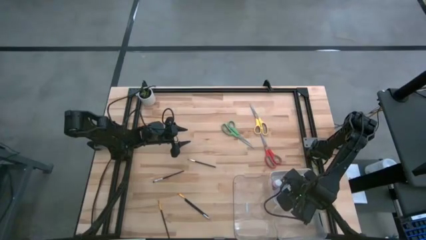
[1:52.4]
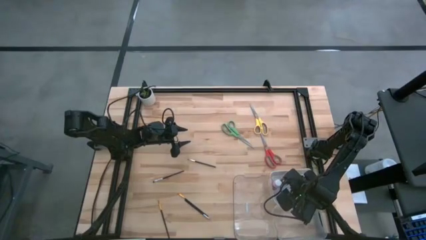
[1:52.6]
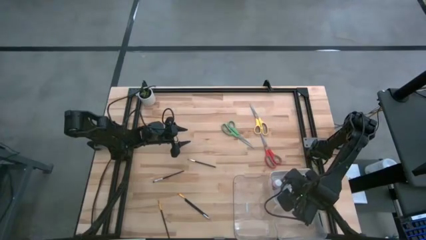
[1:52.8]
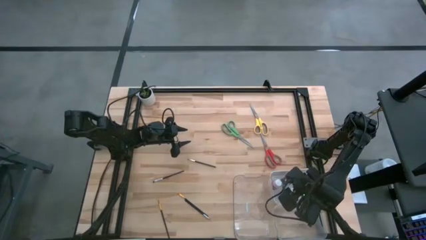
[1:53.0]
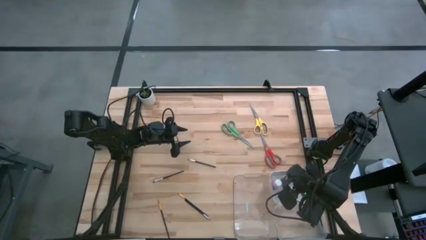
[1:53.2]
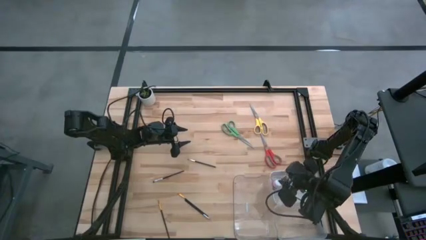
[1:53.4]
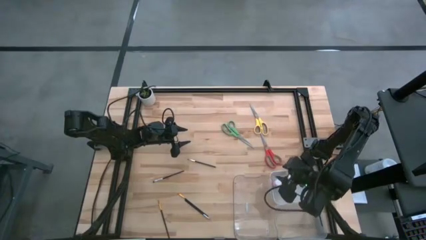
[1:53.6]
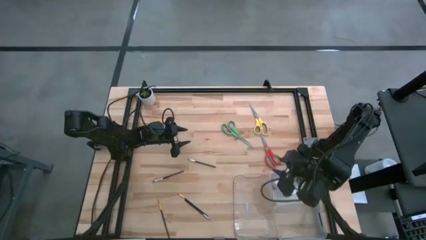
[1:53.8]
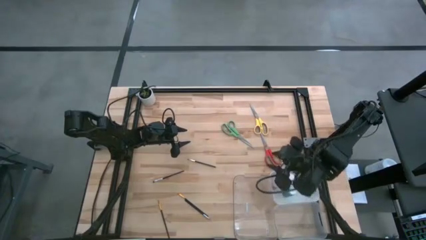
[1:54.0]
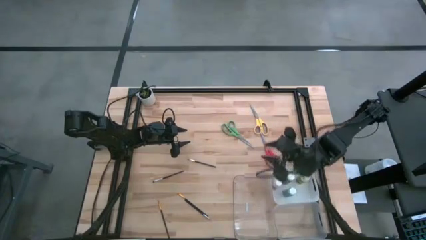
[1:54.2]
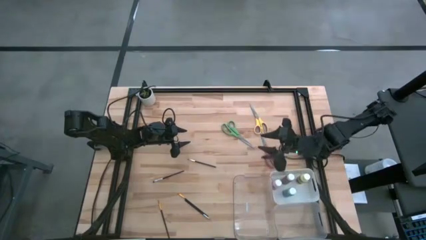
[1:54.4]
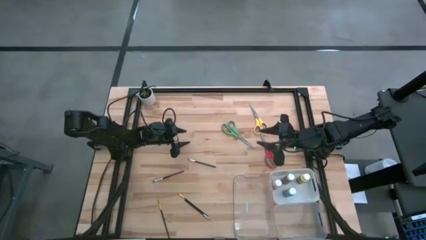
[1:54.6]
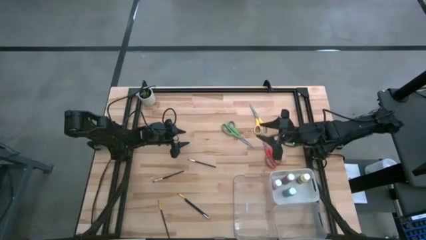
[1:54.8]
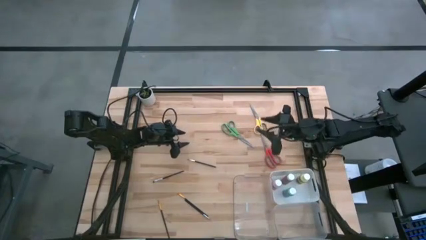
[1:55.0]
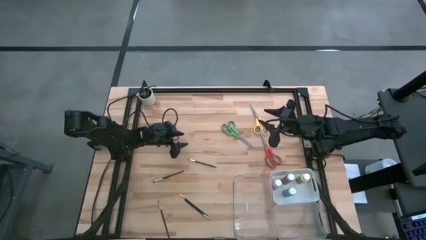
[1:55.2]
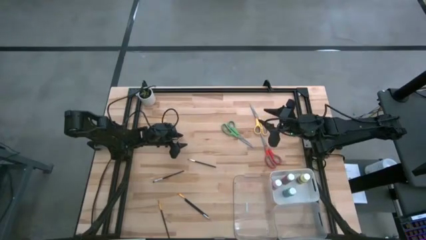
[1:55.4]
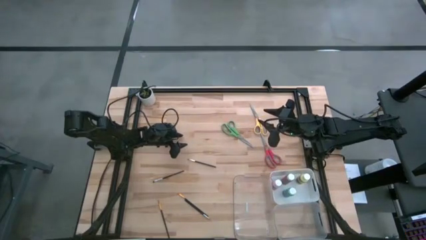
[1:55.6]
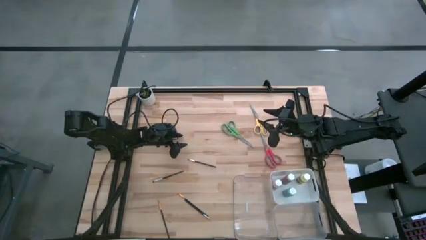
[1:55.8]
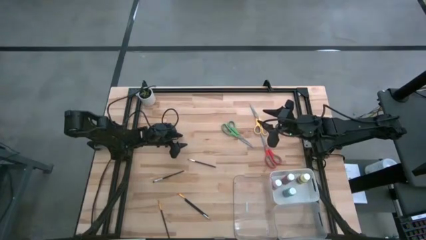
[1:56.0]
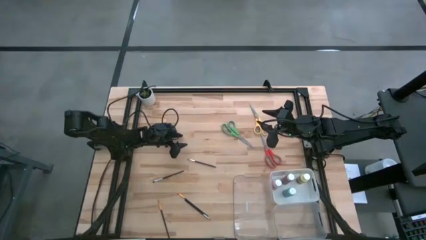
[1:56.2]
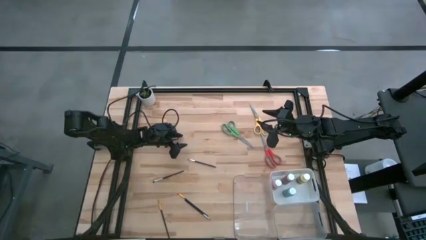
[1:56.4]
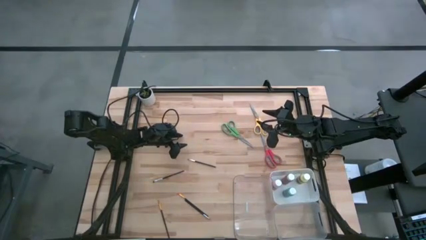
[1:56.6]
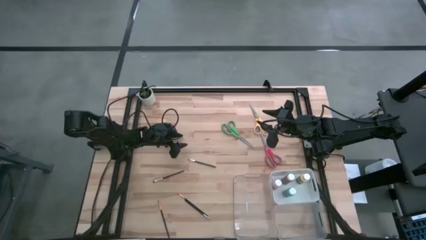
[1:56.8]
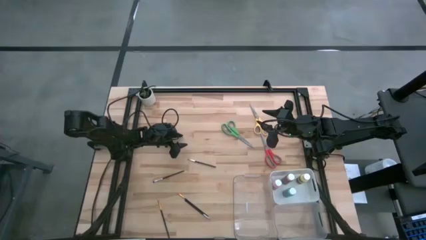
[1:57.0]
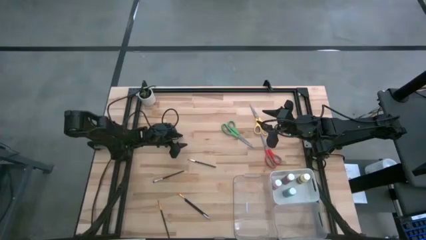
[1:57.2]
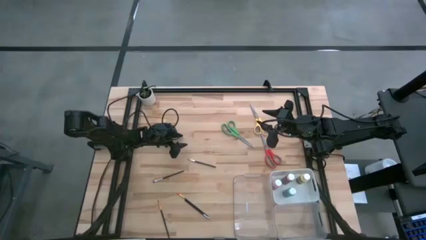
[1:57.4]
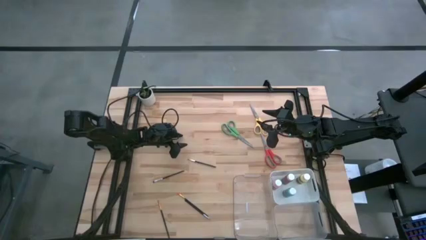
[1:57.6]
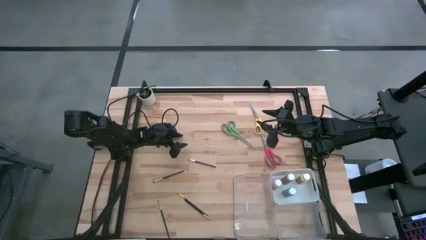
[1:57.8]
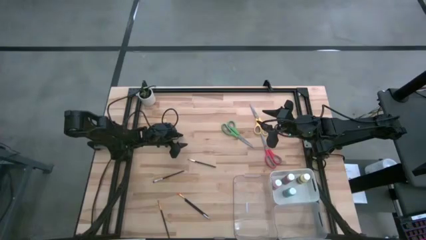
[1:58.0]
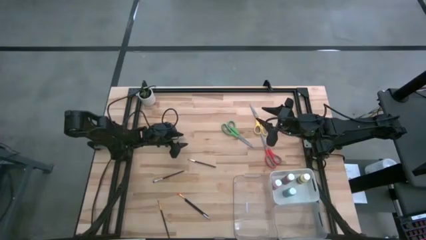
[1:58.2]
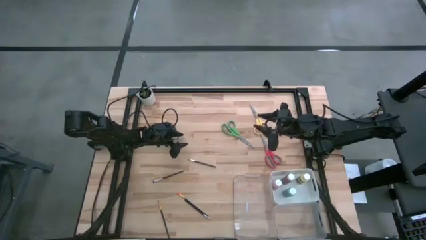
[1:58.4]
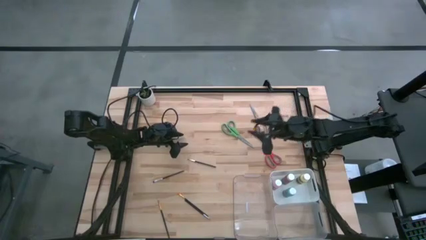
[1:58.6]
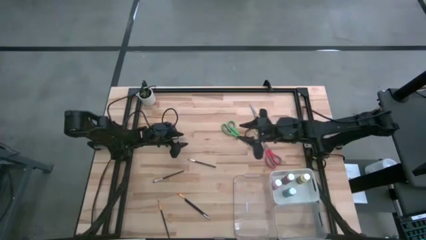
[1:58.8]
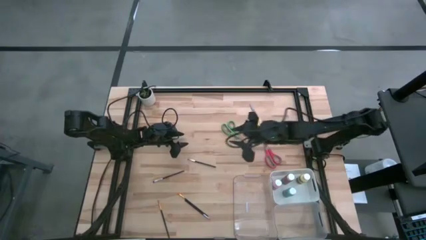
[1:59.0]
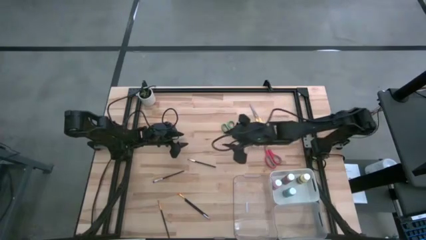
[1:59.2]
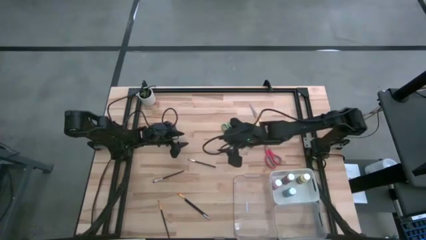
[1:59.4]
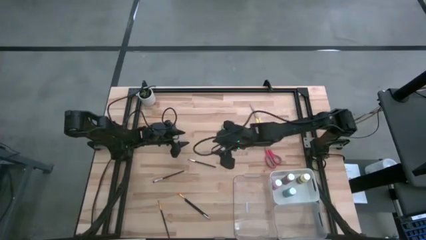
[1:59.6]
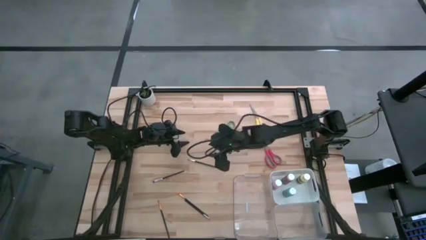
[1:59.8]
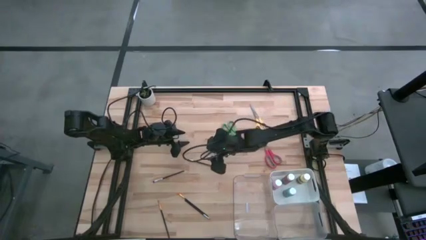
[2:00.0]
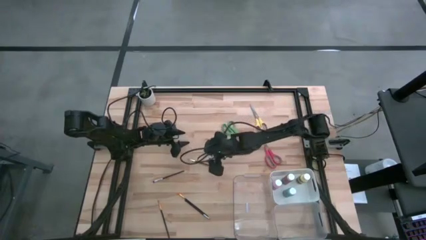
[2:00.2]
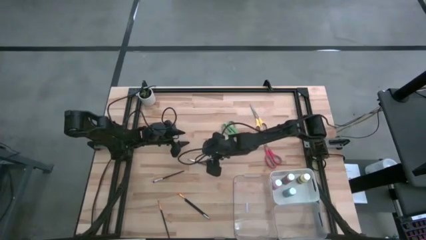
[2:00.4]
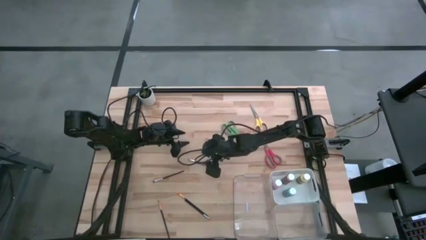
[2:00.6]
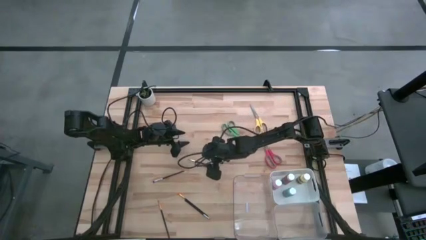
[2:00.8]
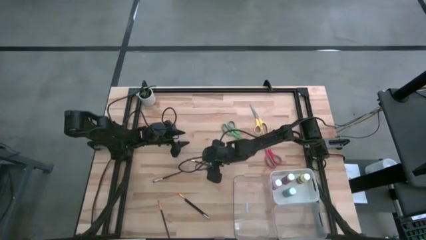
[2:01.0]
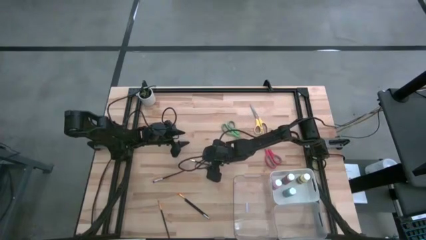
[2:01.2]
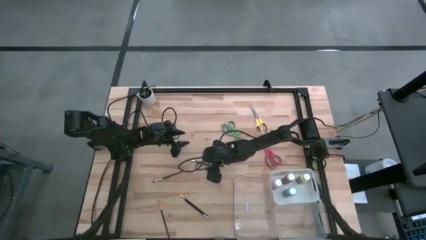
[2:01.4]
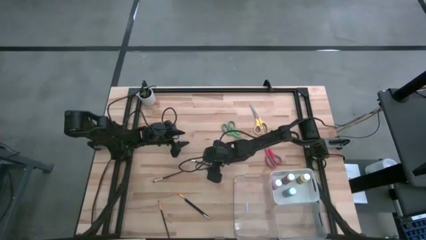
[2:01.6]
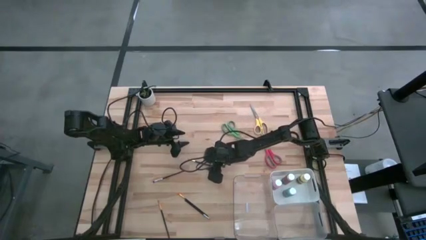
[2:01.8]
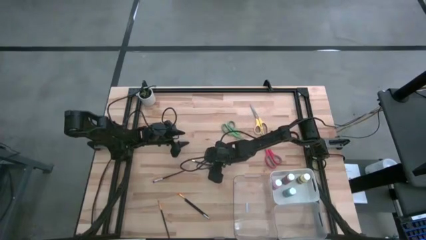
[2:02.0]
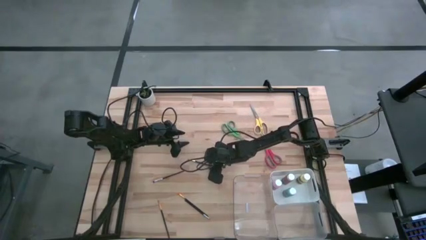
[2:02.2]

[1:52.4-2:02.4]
Task: Pick & Place Paint Supplies
Put the top silver paintbrush into the right transparent bin

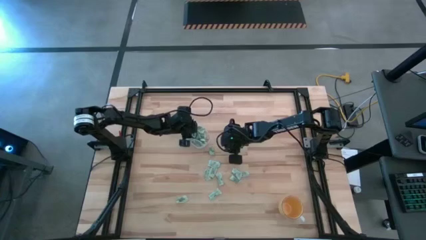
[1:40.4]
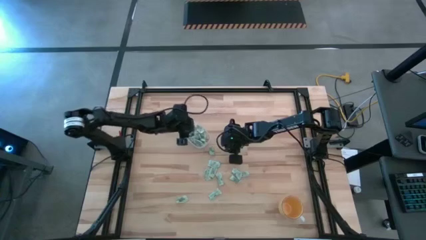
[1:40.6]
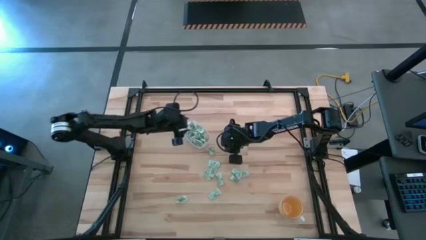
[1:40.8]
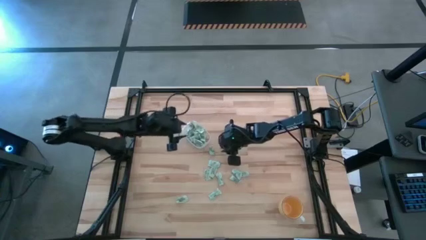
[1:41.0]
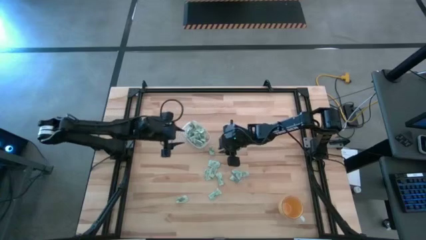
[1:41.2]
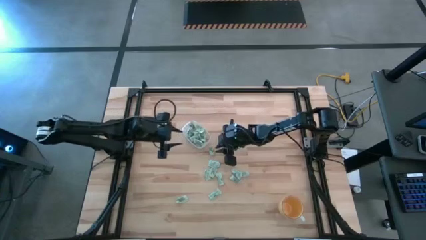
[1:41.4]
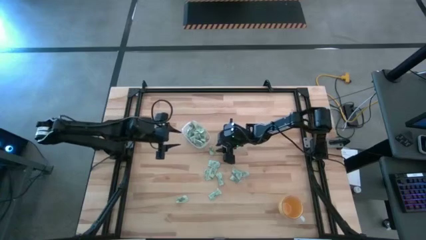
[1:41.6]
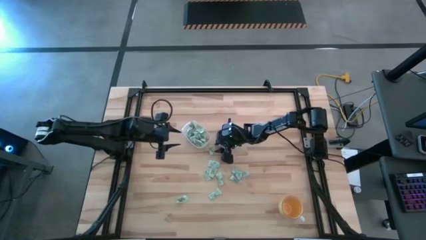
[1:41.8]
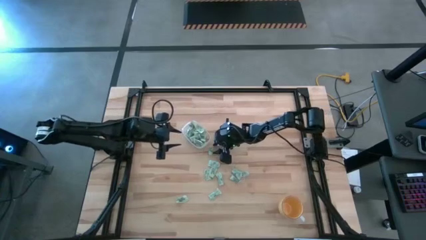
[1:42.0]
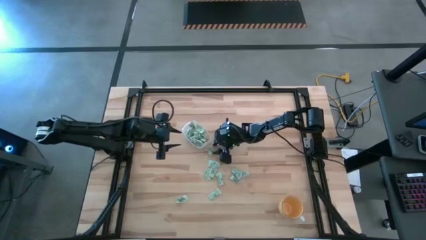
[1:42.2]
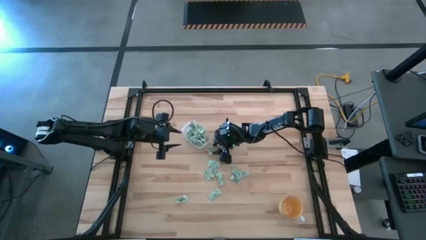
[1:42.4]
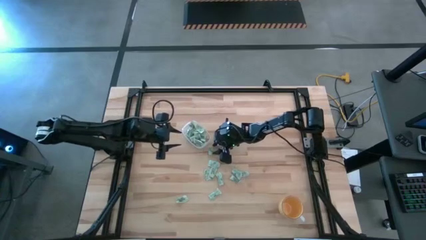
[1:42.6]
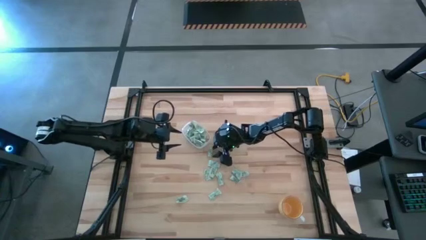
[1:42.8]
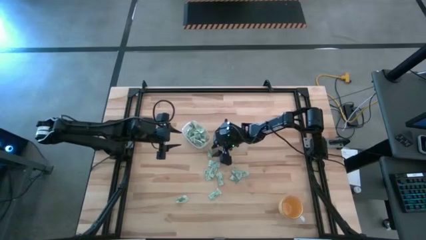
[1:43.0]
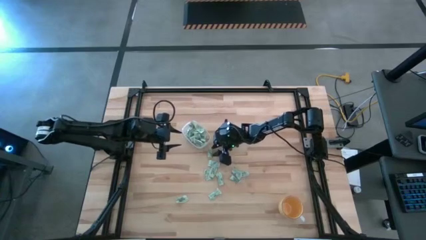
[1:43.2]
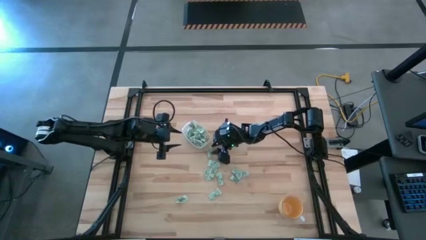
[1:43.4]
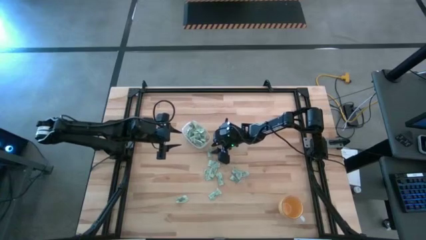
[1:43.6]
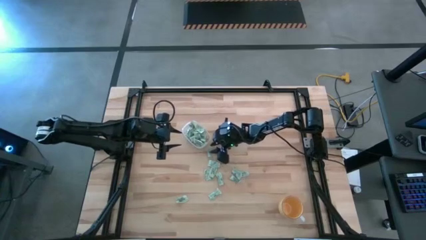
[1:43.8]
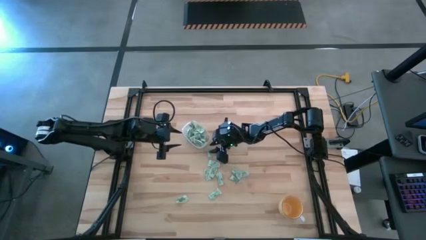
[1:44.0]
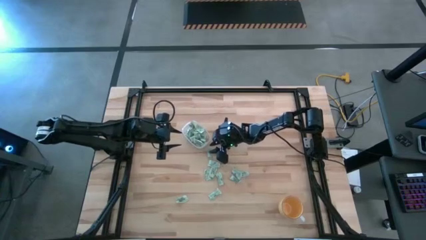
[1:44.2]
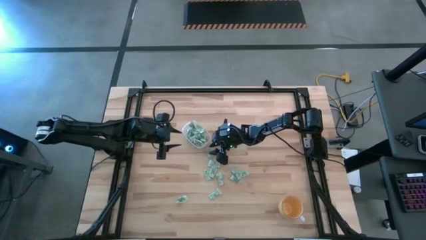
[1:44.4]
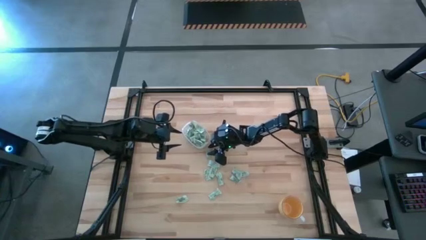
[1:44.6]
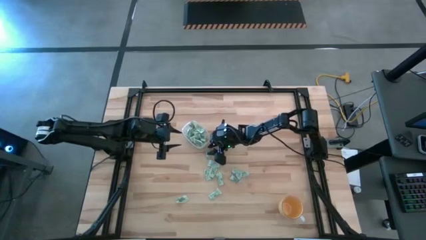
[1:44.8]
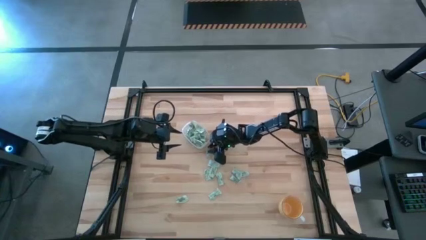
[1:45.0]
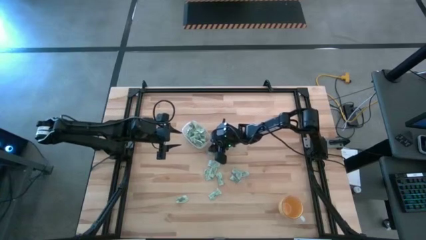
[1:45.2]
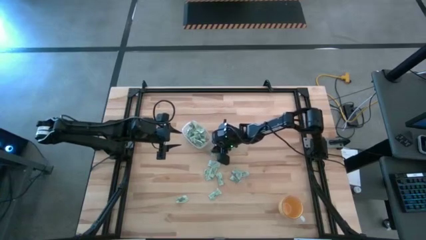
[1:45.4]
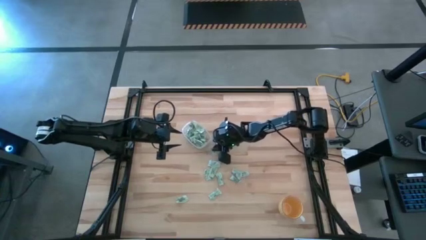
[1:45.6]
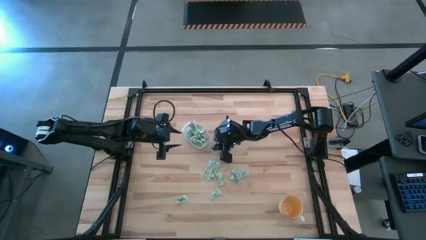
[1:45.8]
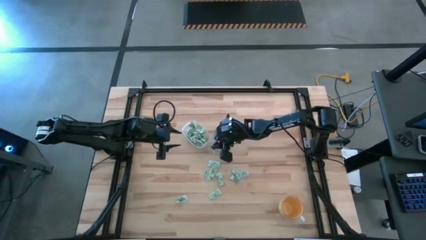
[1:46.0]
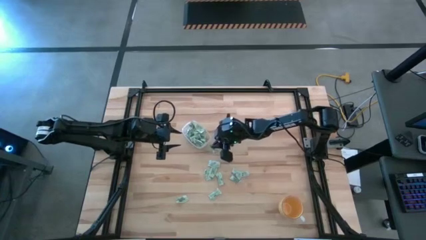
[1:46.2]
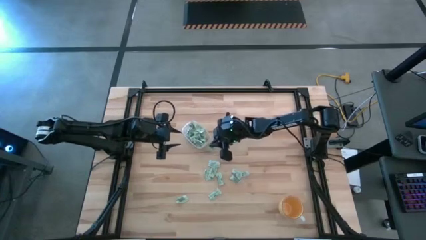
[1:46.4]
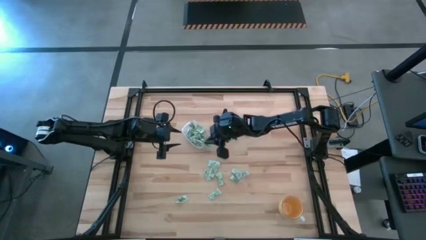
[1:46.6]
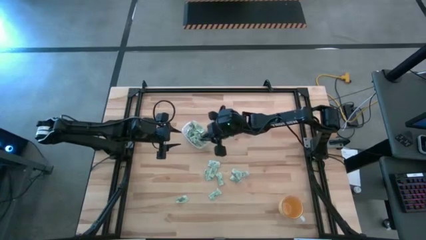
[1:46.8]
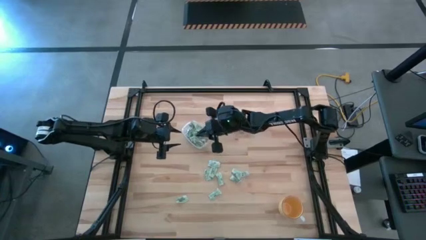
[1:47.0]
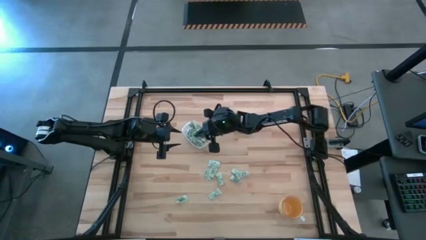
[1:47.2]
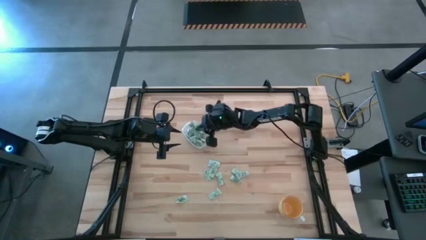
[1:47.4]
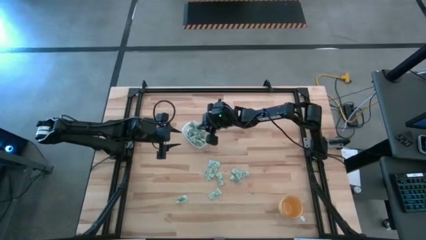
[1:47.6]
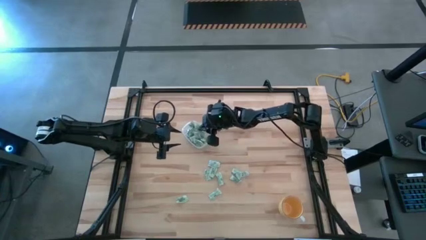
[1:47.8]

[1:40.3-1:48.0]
Task: Pick and place Stevia / Truvia into bins
Put the stevia packet into the transparent bin
